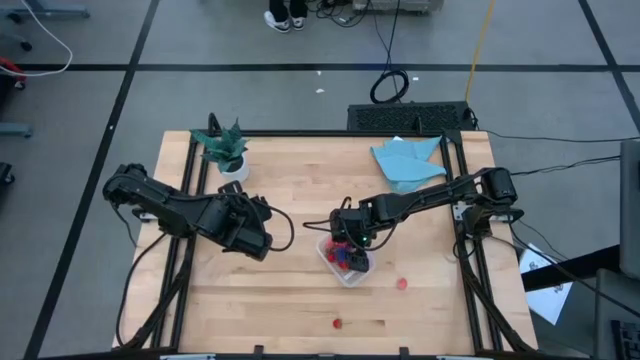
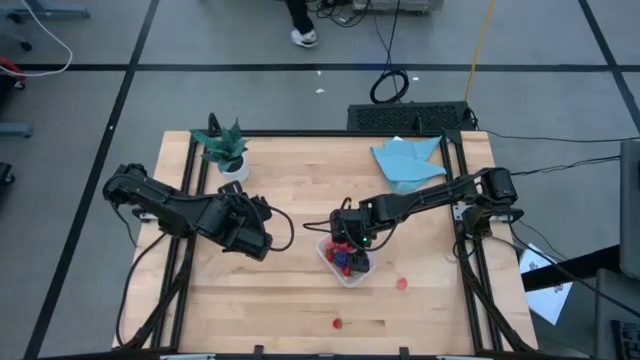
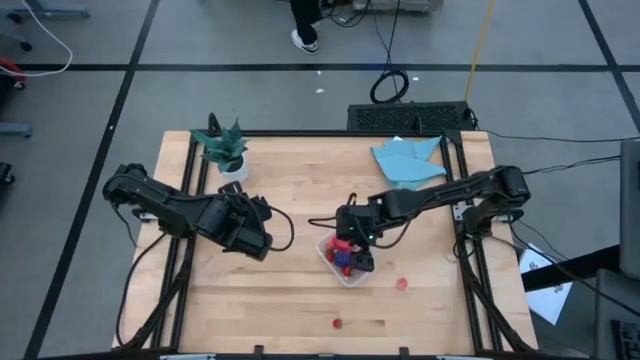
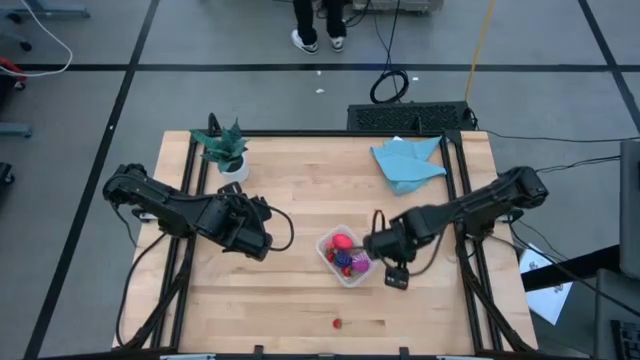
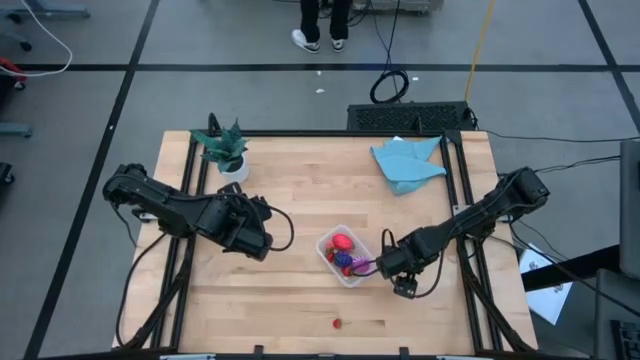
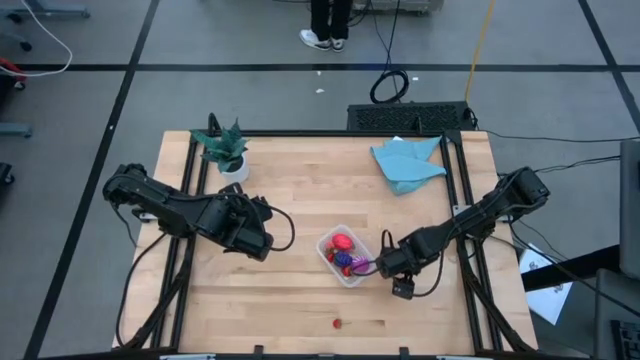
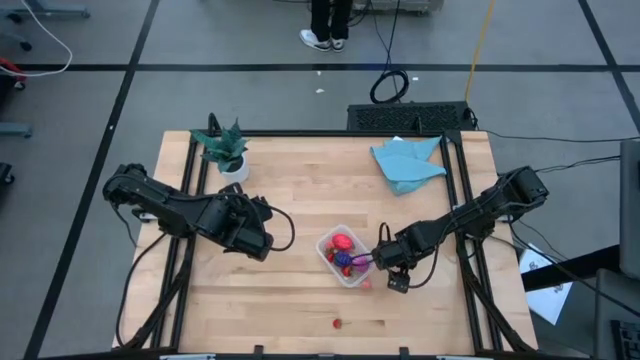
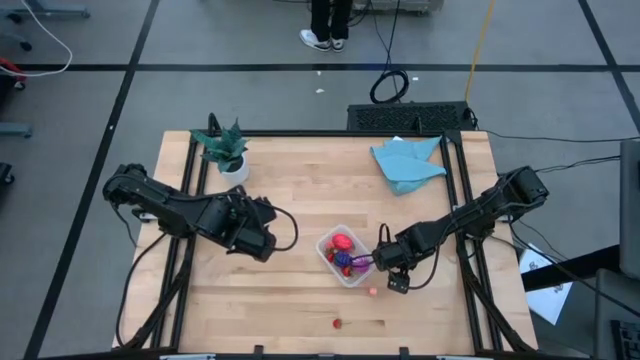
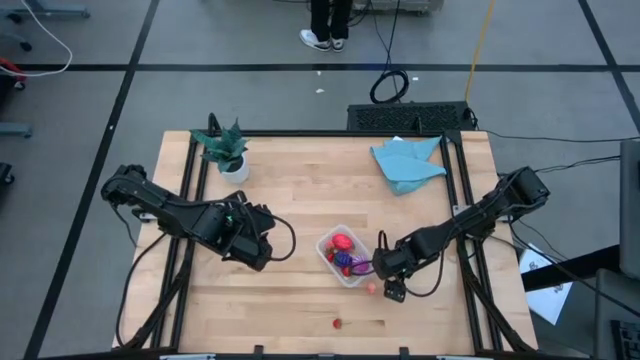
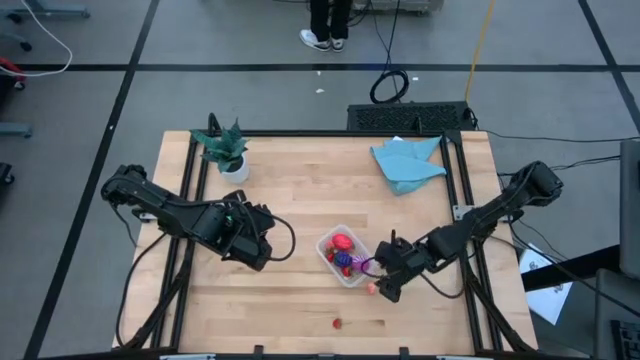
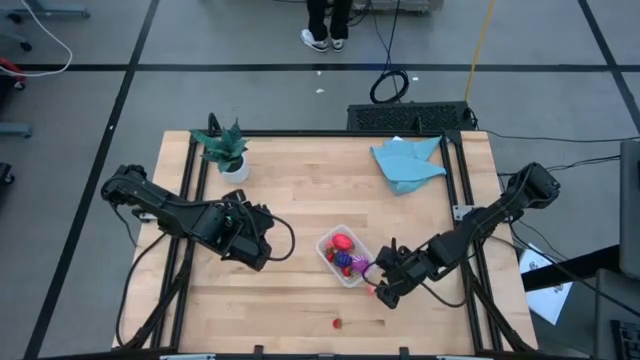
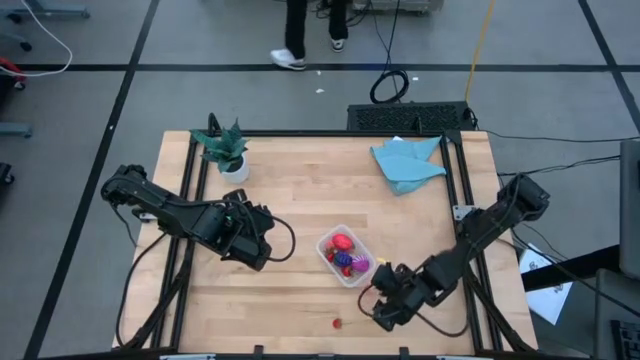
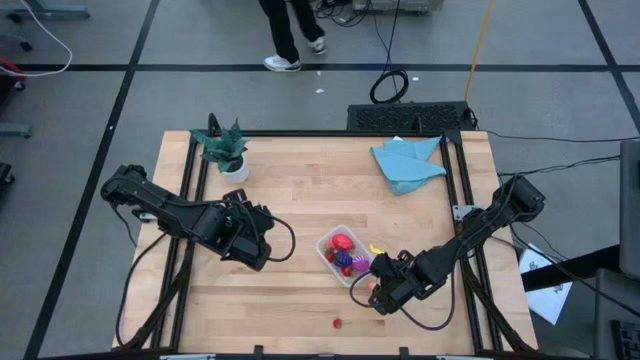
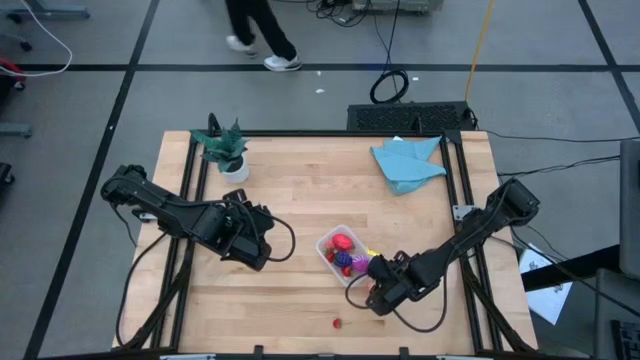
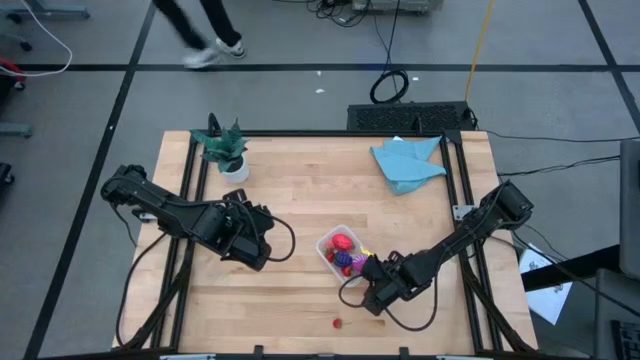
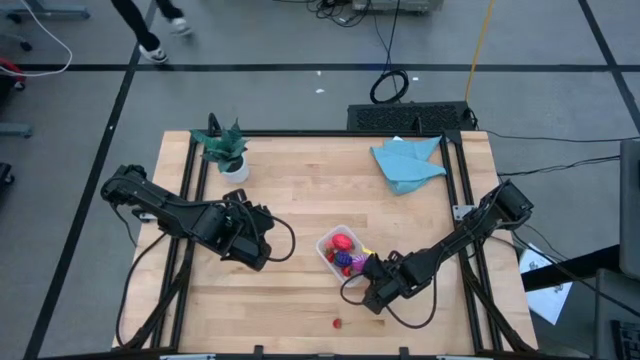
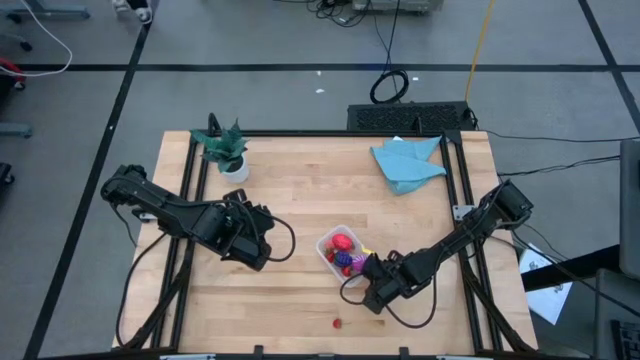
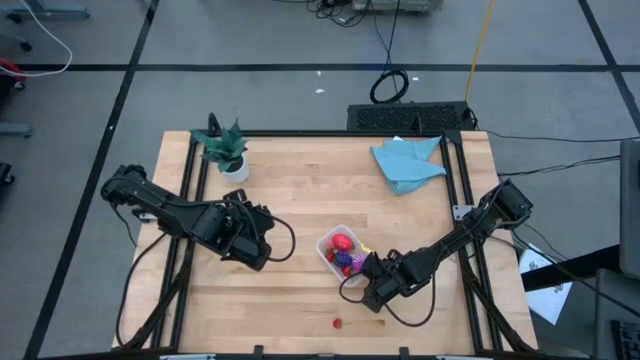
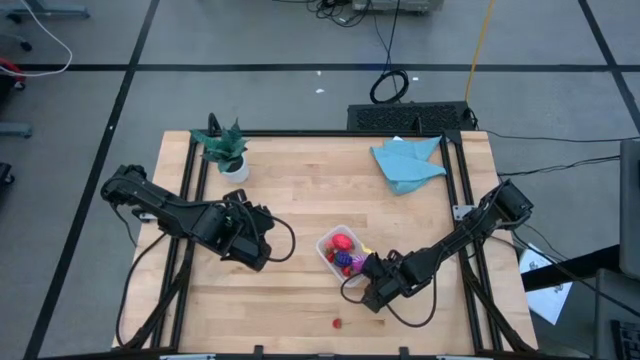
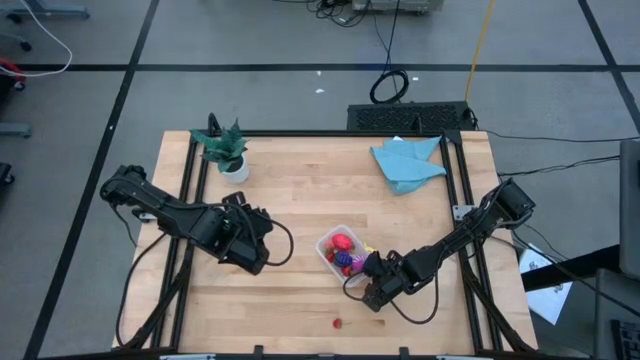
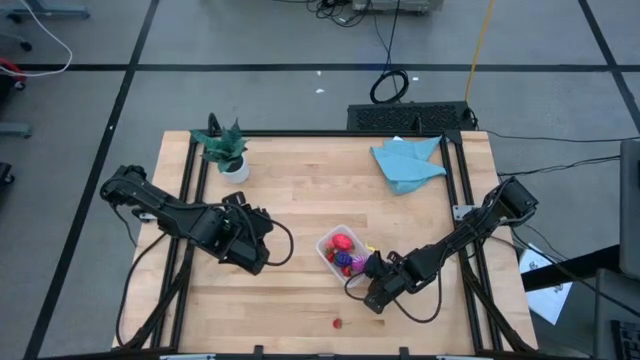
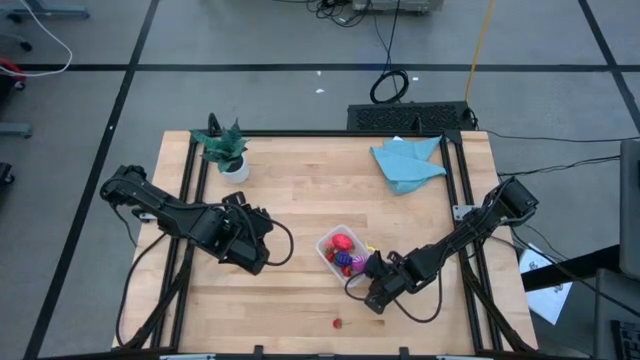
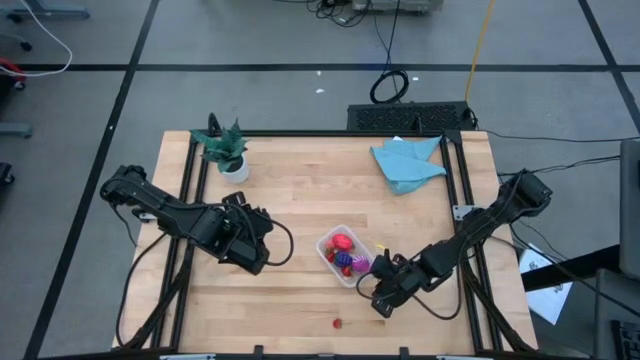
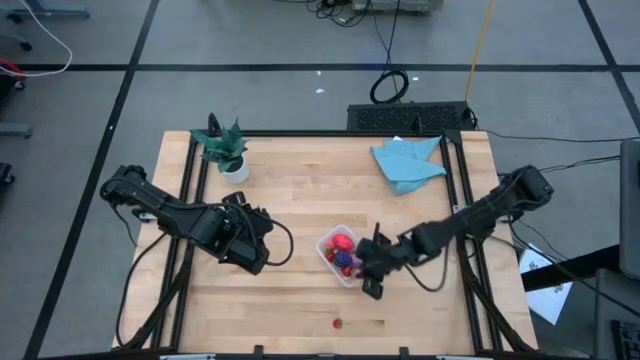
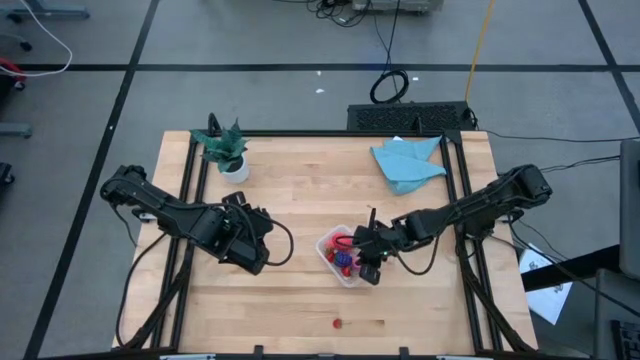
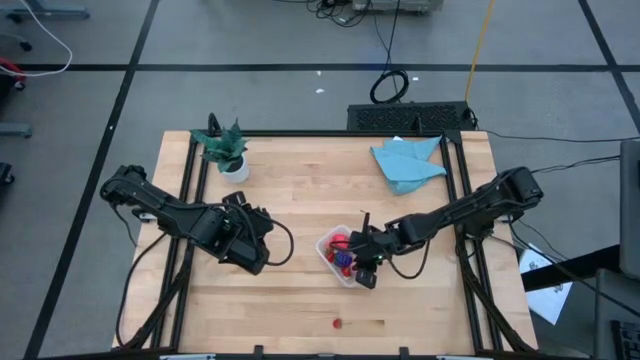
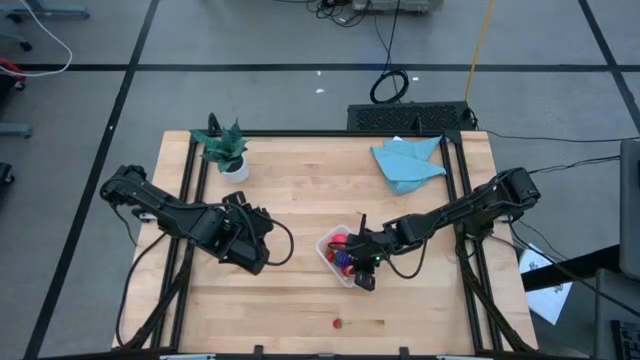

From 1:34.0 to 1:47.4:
Task: Pick and placing Produce into tupperware
Put the peach into the transparent container

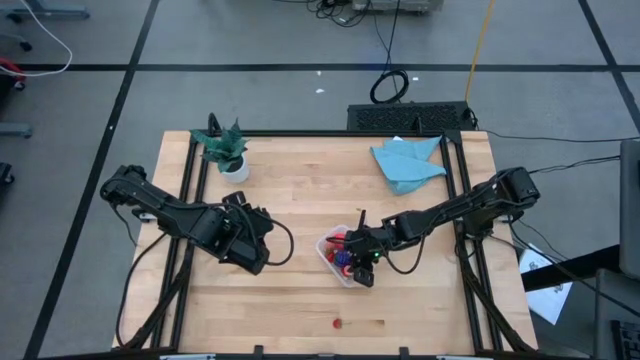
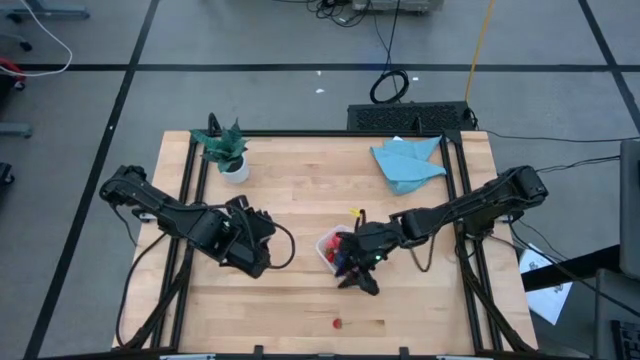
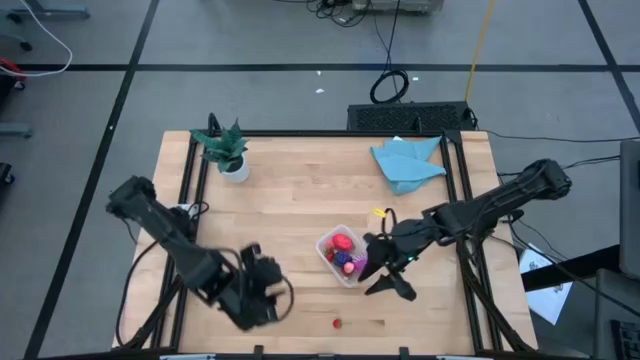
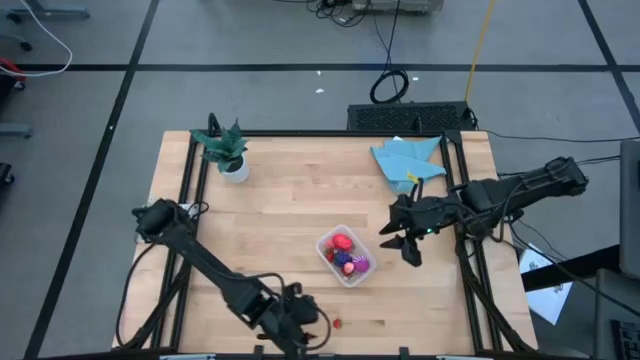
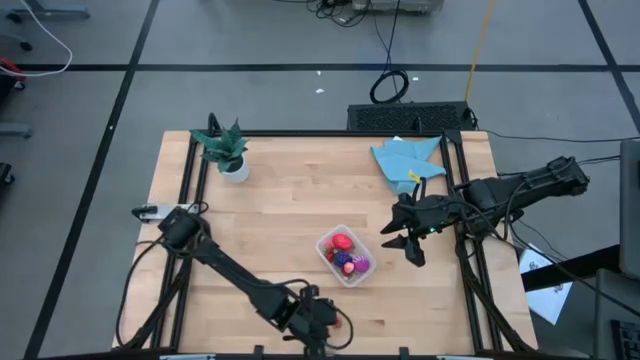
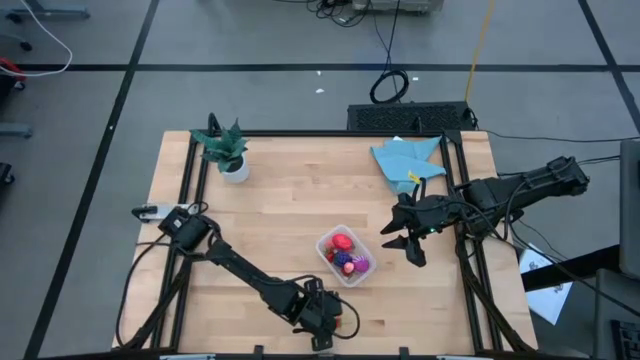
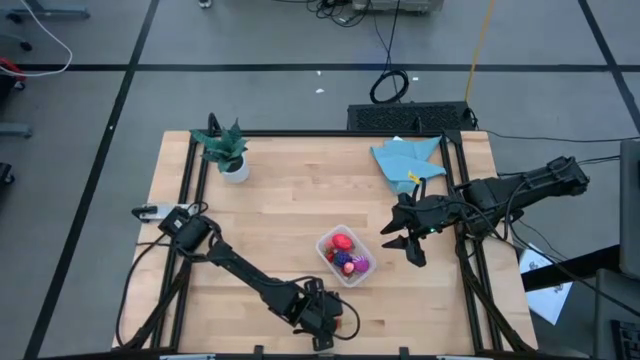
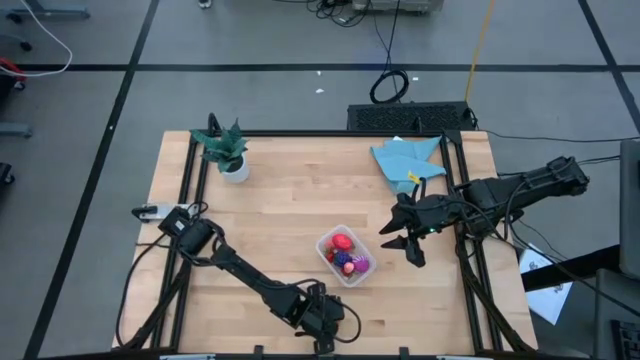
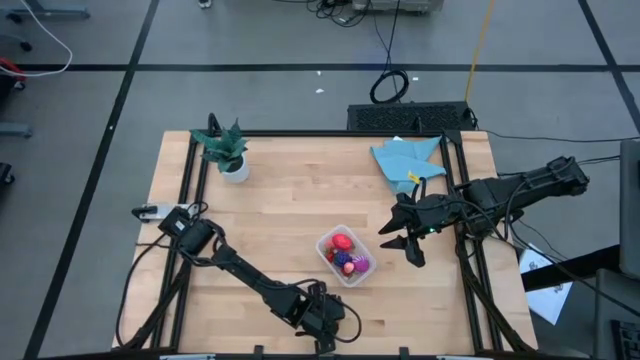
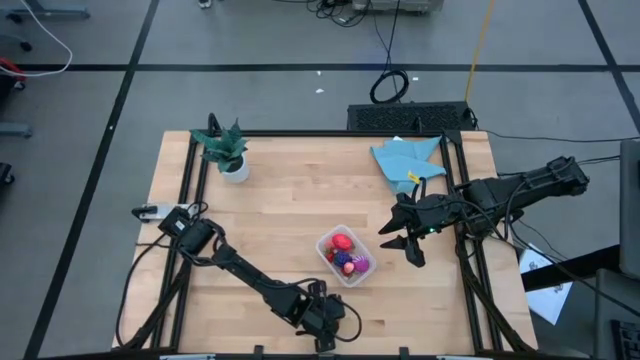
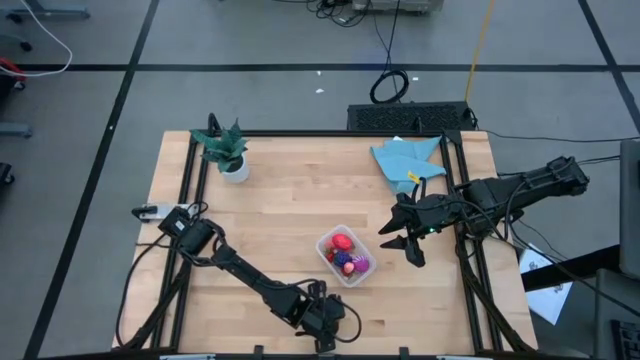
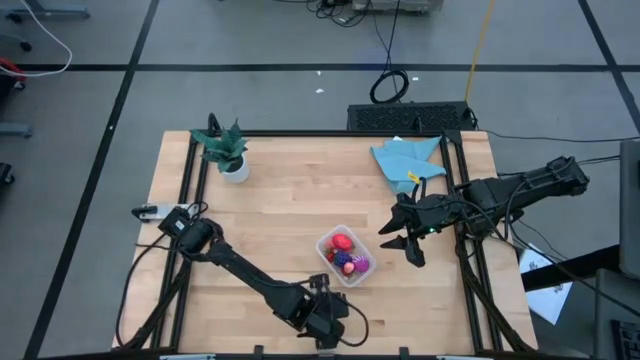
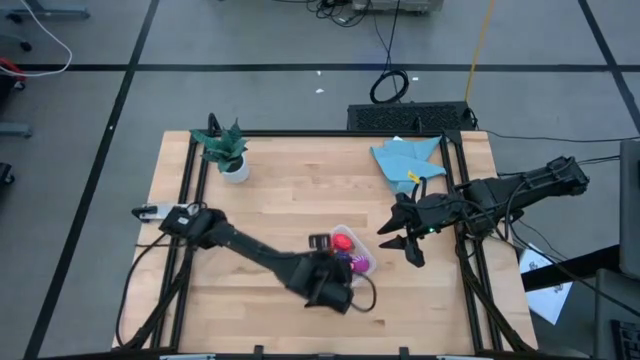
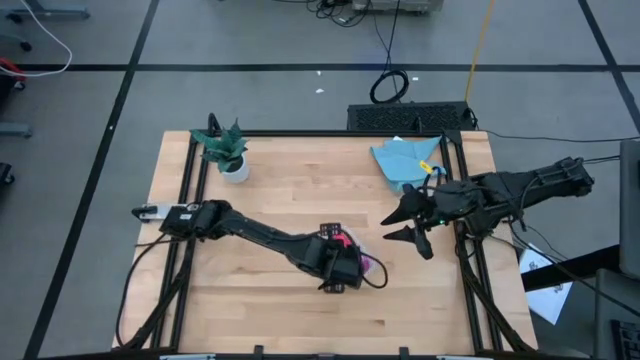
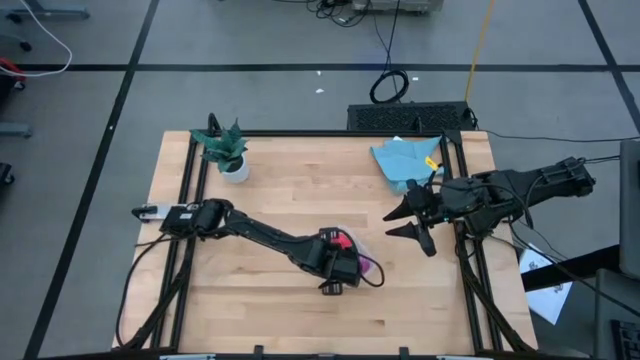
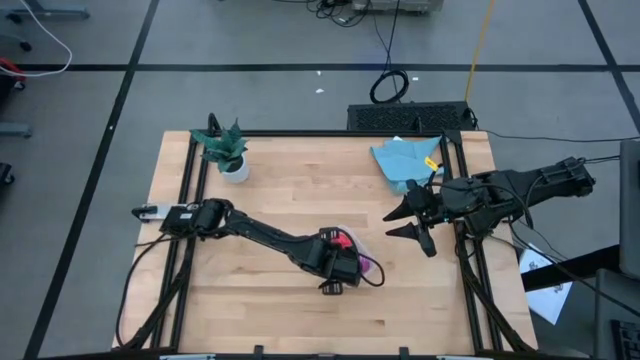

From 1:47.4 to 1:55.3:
Put the strawberry into the transparent container
